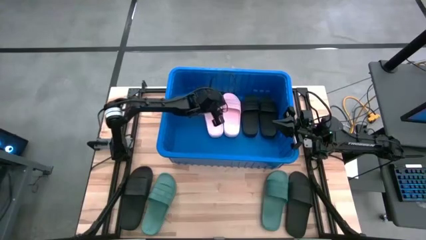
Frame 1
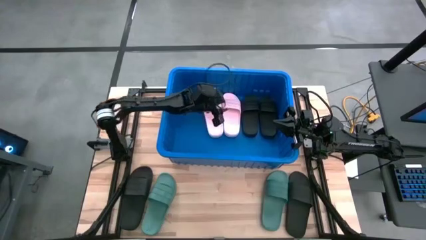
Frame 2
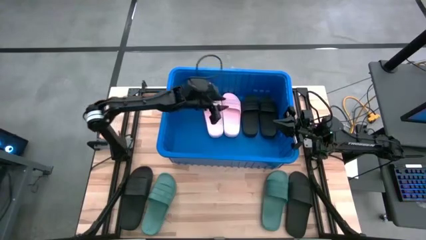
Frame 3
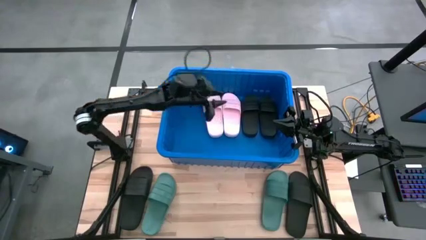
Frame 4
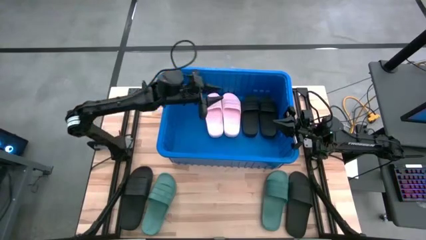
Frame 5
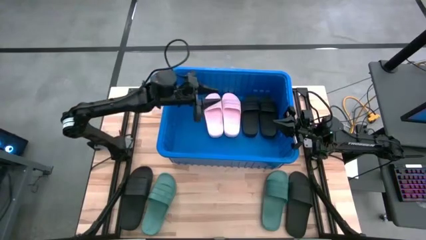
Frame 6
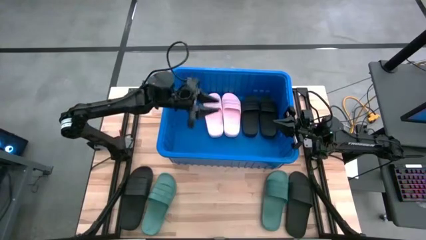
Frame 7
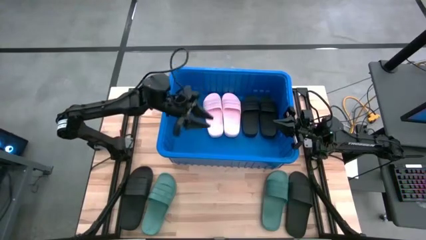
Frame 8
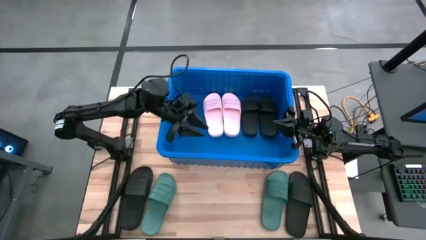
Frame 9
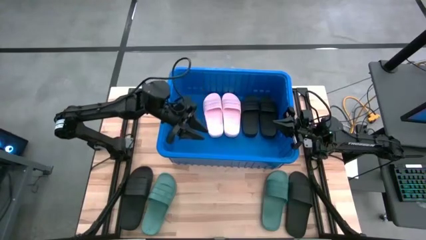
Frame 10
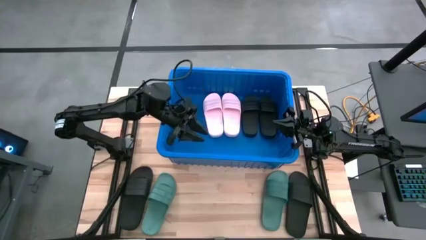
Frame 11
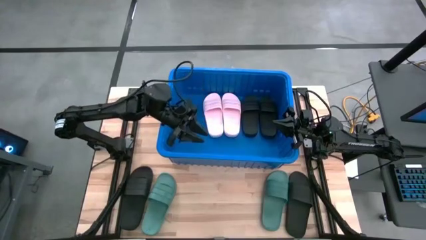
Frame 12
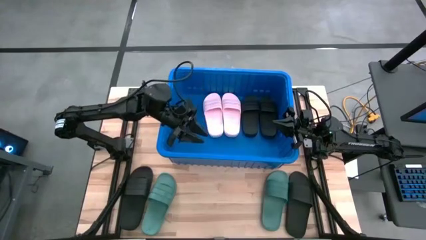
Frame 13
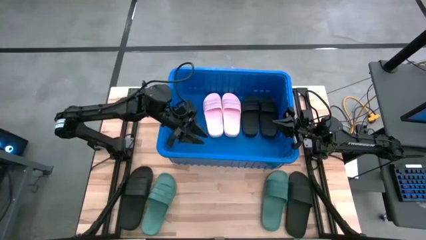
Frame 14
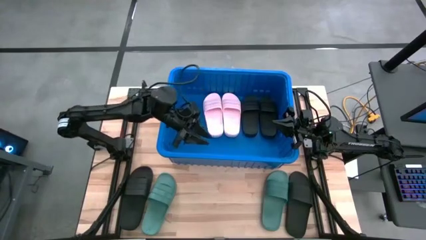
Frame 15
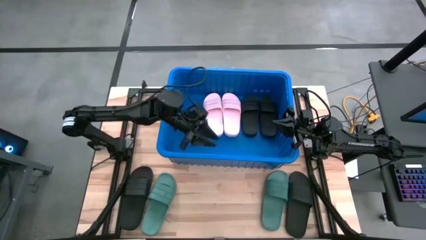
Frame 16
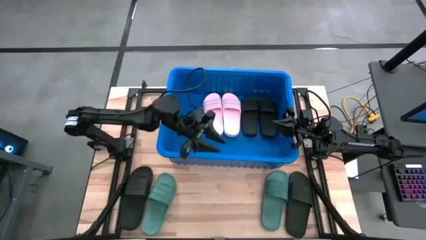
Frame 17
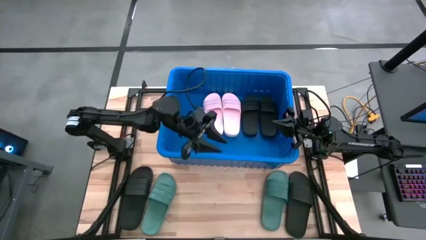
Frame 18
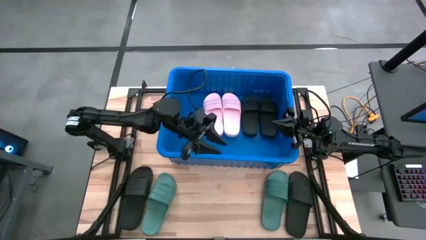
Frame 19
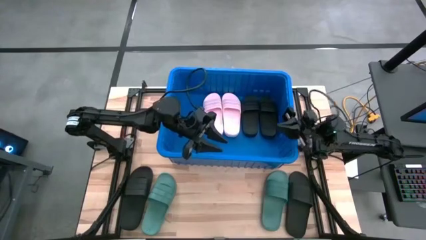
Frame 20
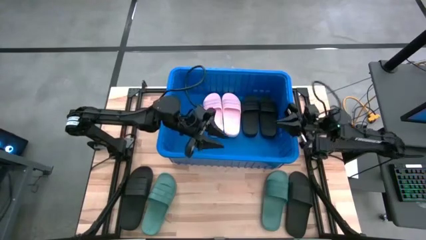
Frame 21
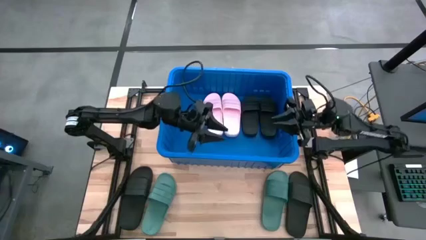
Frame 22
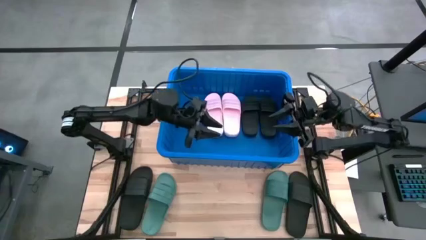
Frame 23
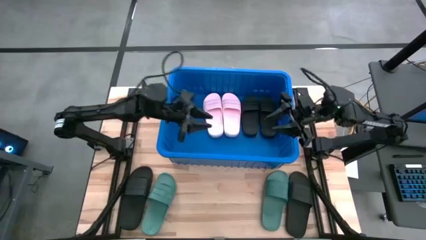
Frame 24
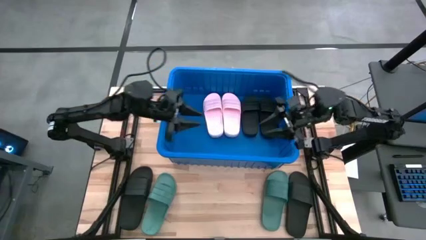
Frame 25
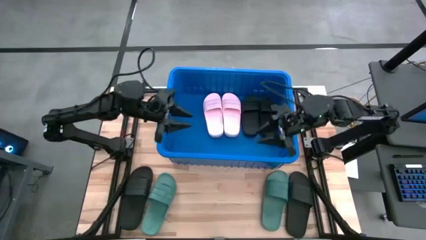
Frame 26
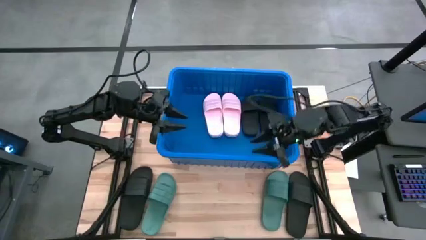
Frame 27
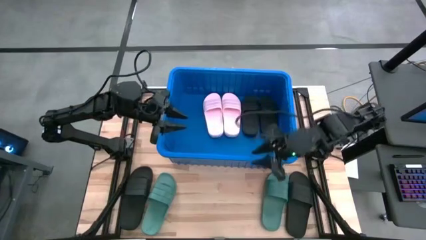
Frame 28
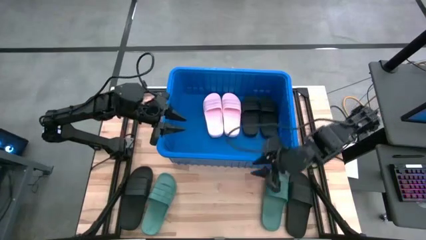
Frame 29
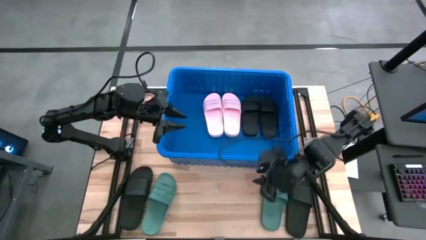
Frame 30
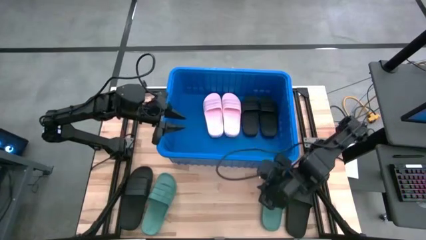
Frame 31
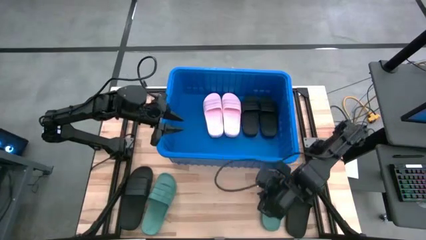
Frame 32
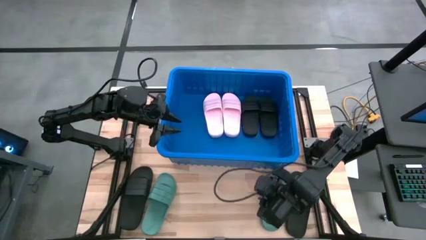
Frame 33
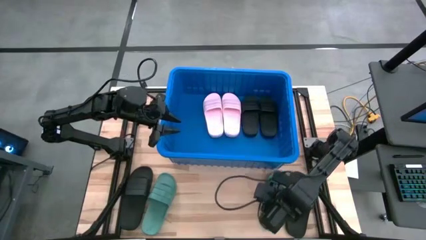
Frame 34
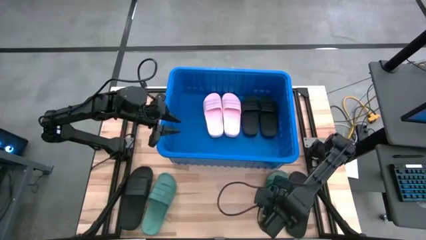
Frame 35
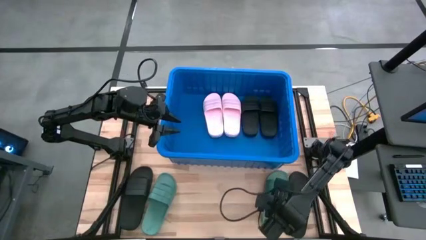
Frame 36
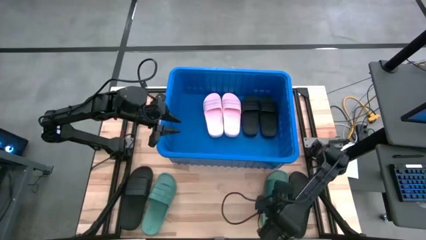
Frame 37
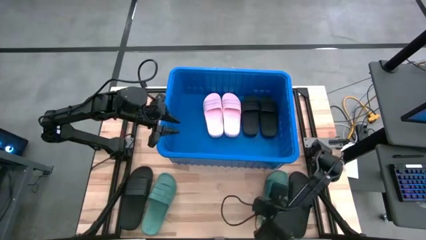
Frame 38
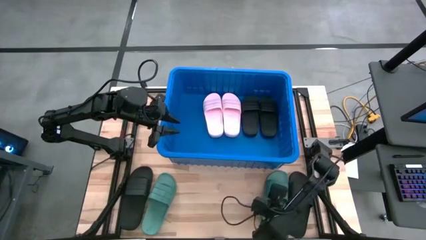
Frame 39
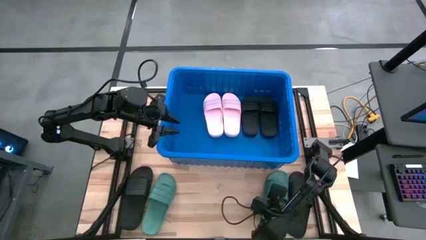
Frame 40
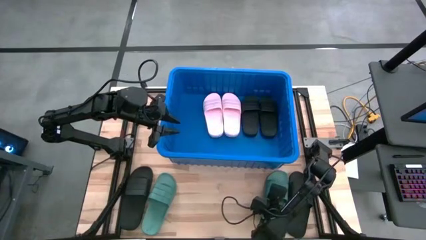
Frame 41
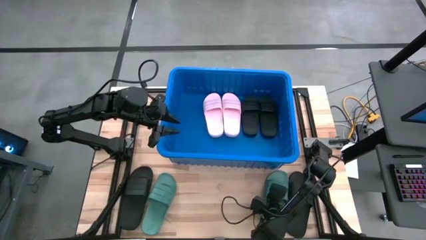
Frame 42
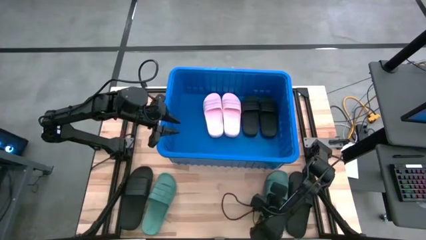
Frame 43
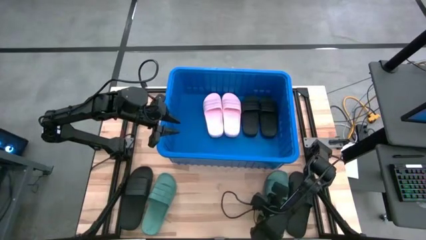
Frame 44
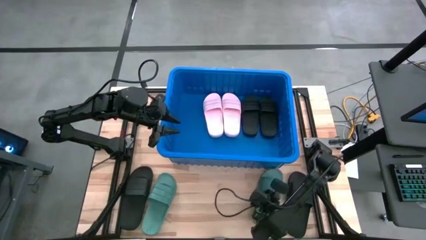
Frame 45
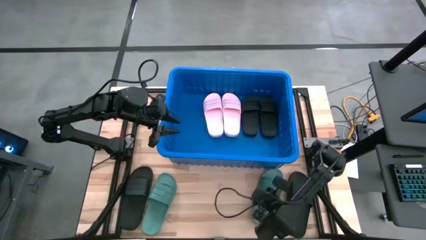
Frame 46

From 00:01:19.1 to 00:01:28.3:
Task: Pick and place slides into bin
Put the right green slide into the blue bin

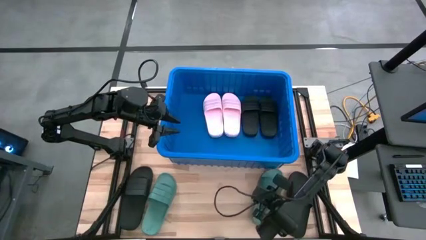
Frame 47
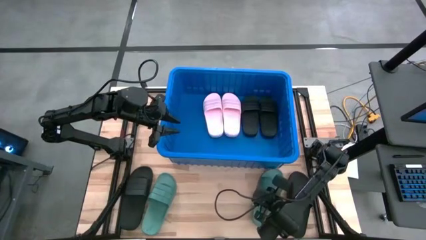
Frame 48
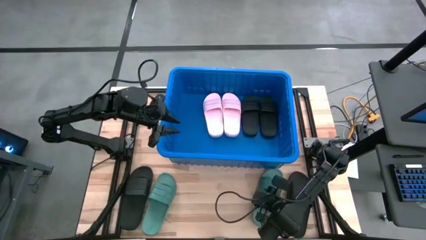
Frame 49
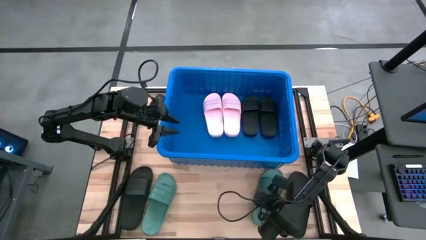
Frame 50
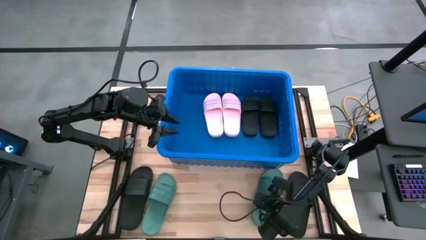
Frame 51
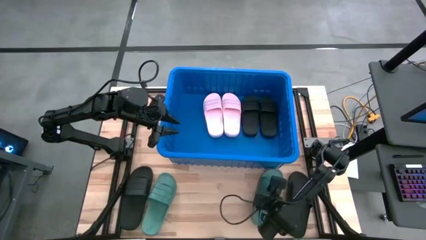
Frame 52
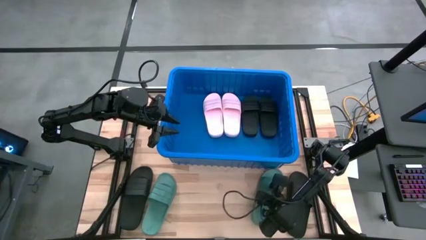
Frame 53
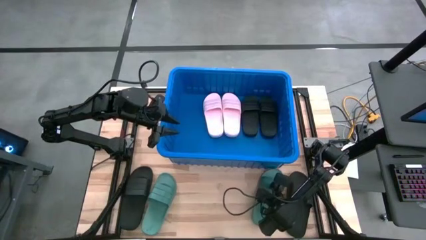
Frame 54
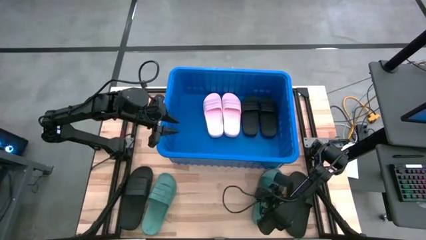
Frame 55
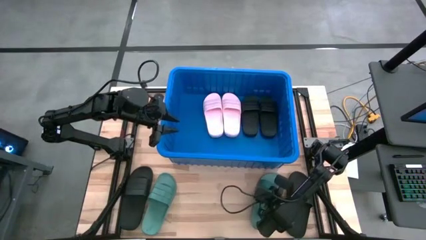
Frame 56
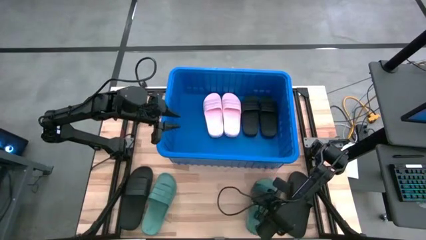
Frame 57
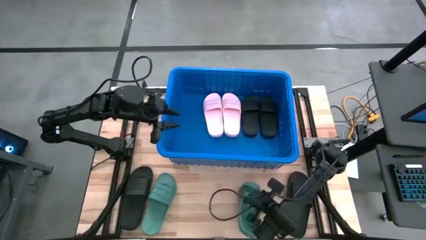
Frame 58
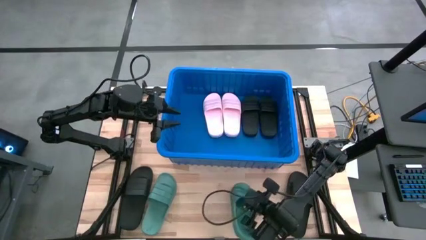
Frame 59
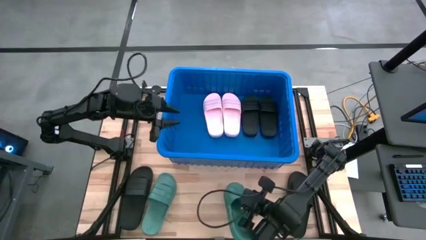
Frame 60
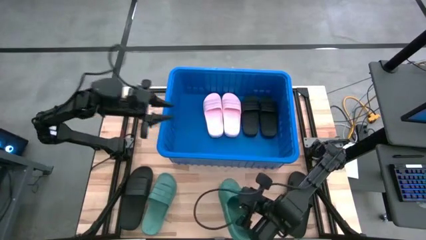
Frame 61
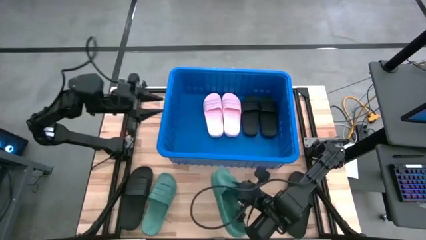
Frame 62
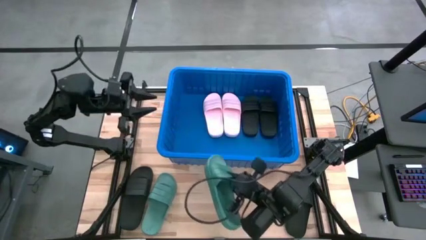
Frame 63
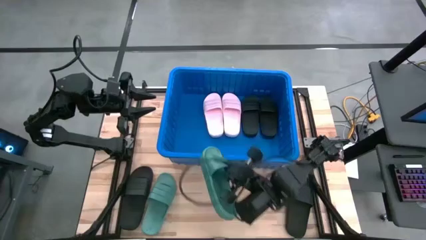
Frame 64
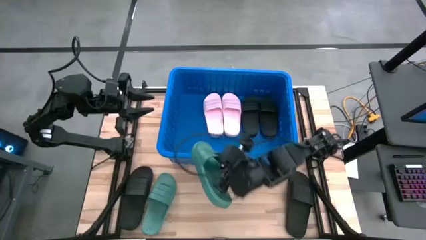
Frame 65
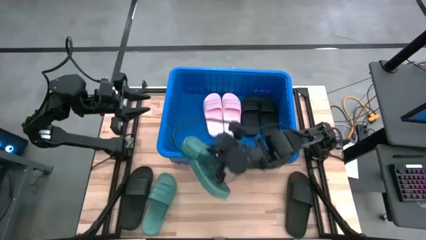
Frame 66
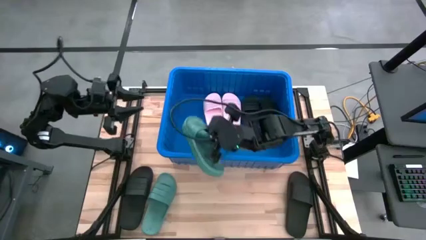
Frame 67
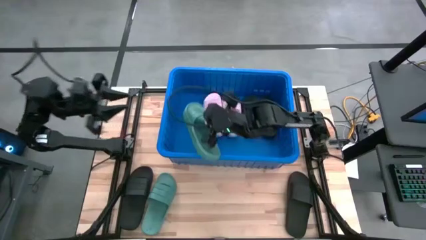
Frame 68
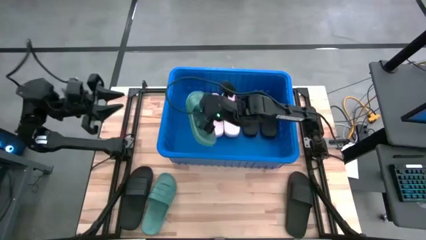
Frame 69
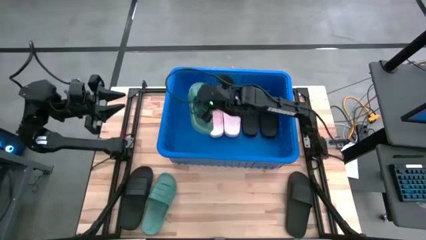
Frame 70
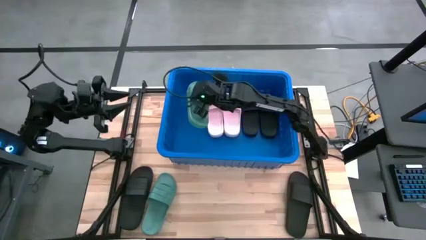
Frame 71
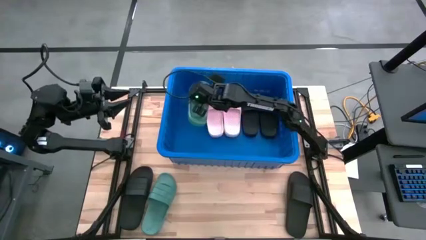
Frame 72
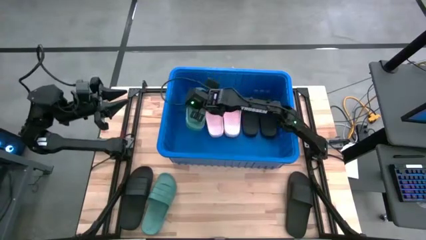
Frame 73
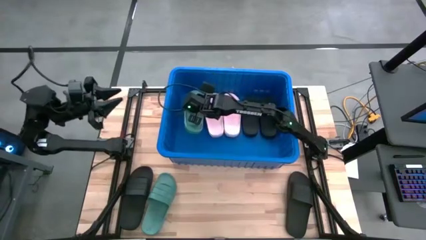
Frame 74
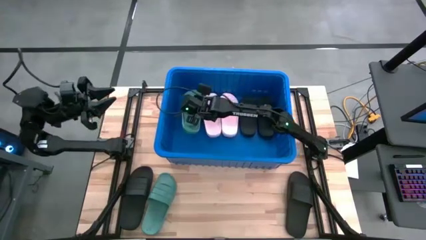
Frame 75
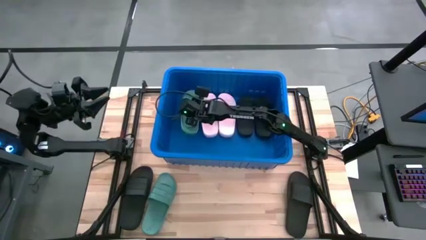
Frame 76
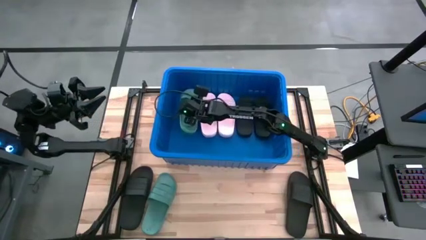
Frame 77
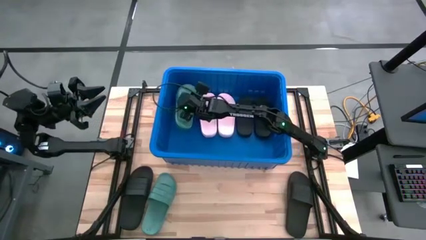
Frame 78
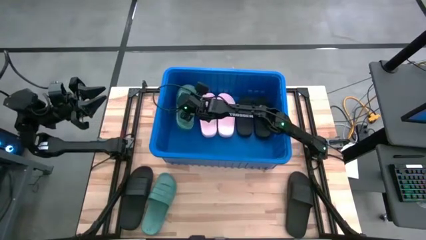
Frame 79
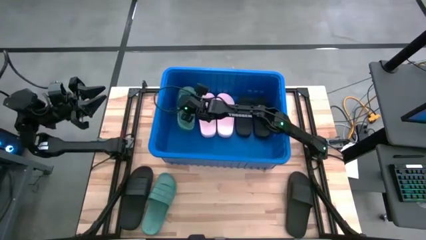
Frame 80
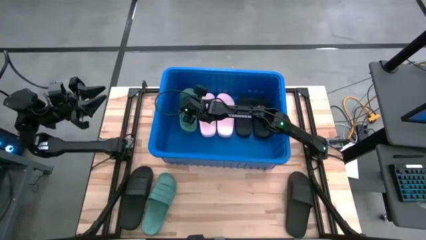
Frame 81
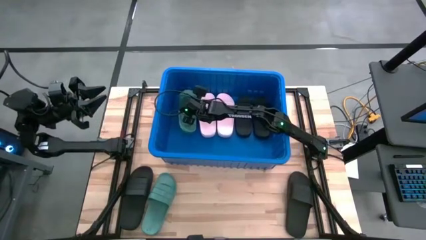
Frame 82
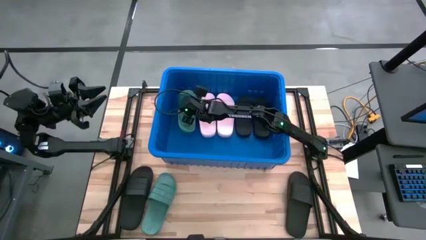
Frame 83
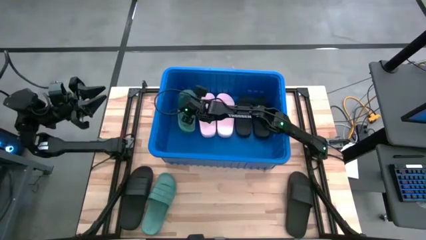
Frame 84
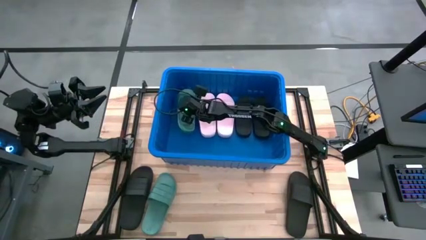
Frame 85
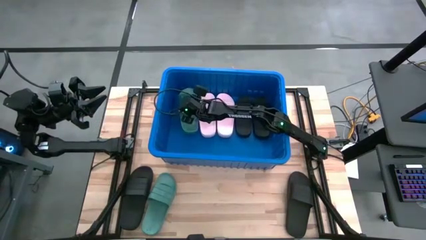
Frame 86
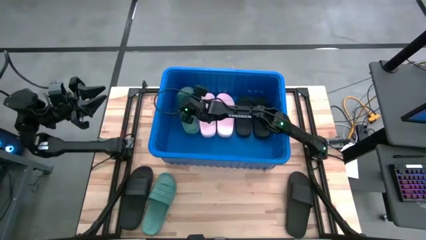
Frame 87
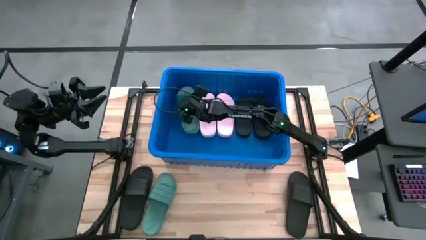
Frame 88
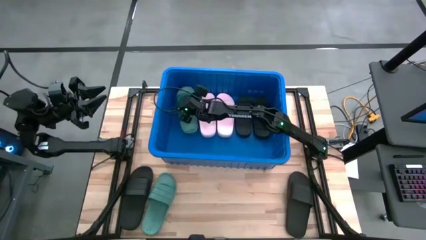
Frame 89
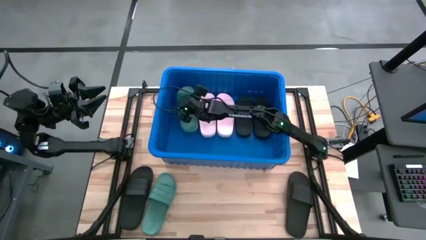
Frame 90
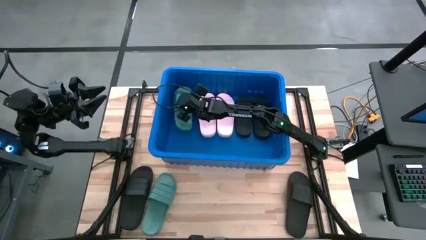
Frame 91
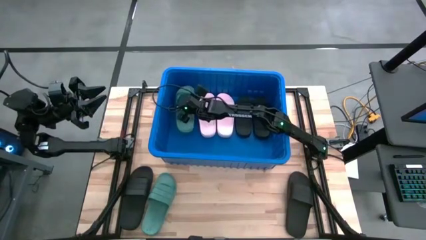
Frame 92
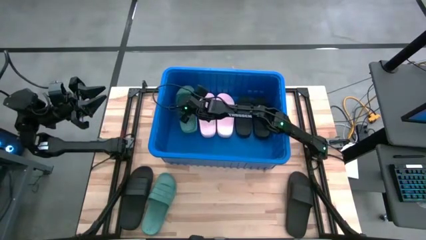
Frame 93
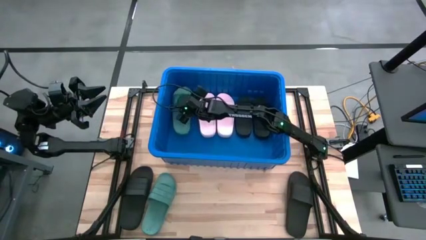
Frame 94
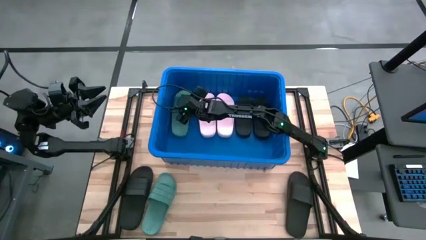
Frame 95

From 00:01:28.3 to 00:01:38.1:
Put the right green slide into the blue bin
